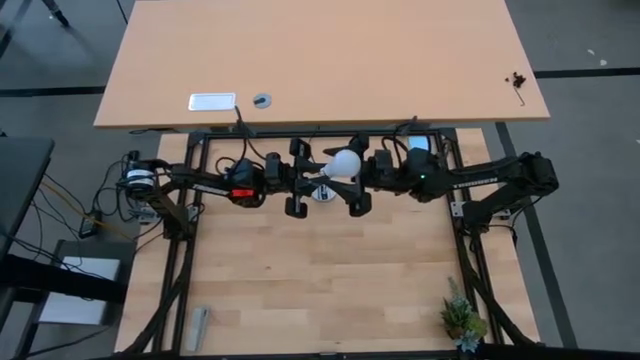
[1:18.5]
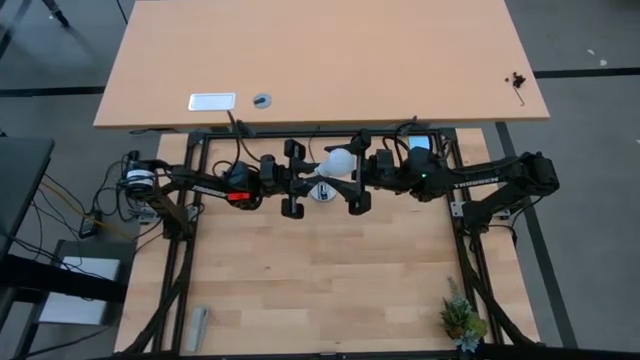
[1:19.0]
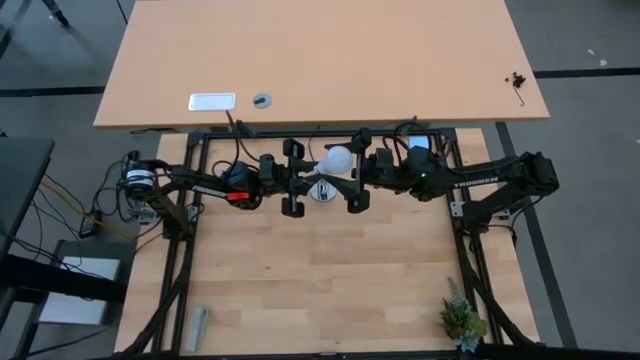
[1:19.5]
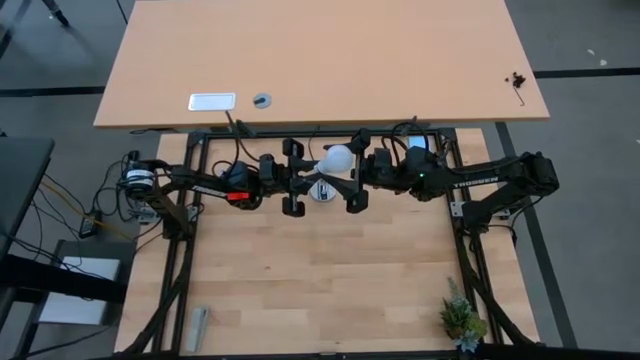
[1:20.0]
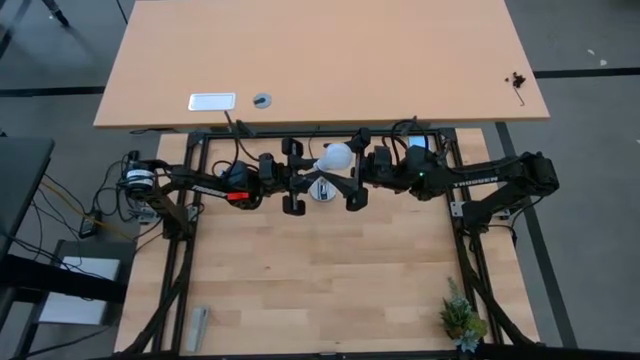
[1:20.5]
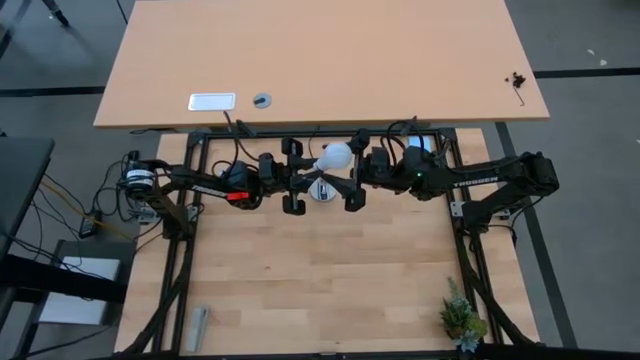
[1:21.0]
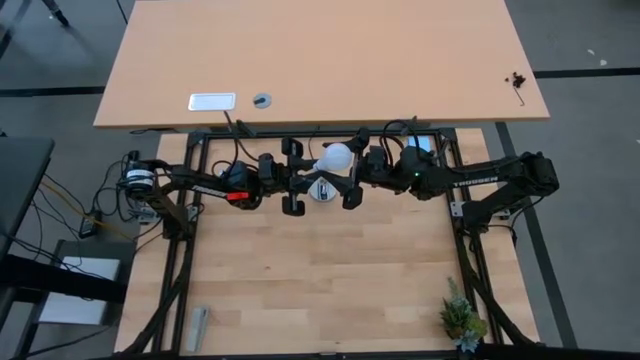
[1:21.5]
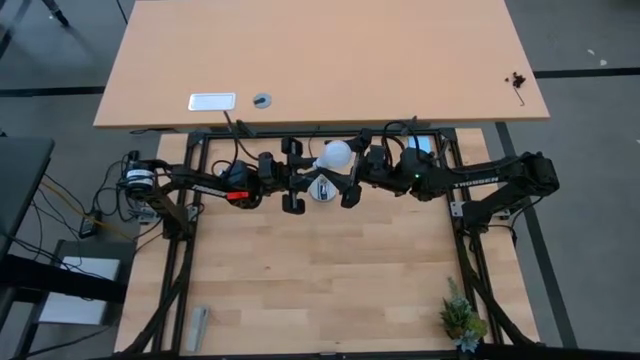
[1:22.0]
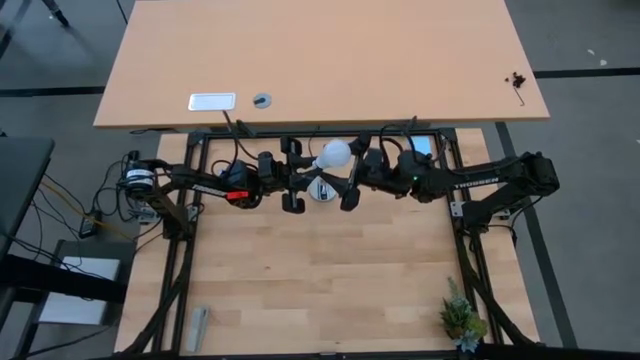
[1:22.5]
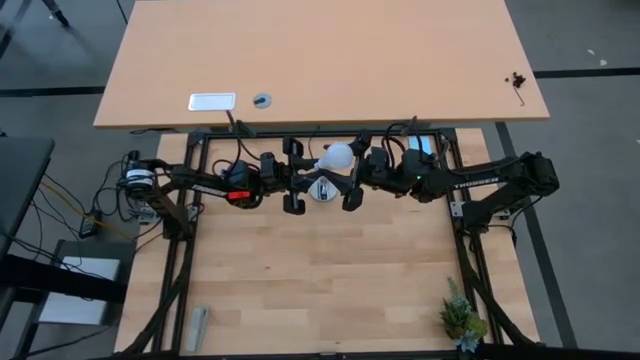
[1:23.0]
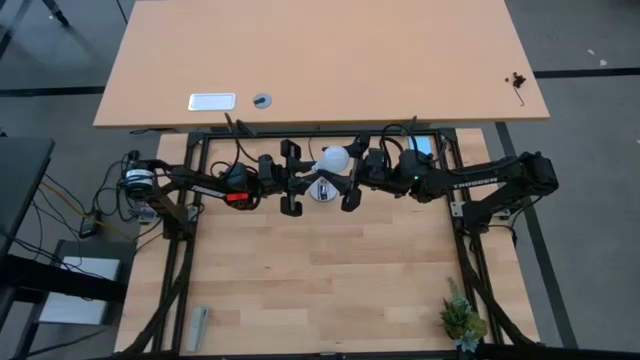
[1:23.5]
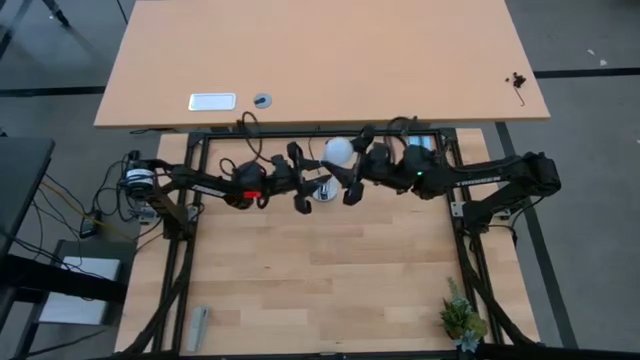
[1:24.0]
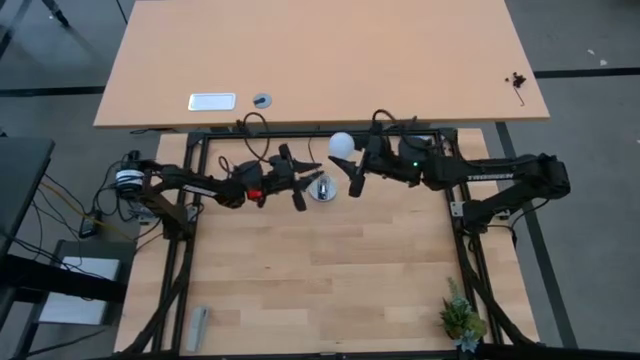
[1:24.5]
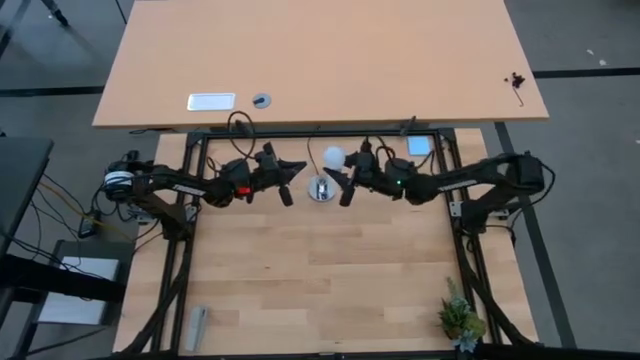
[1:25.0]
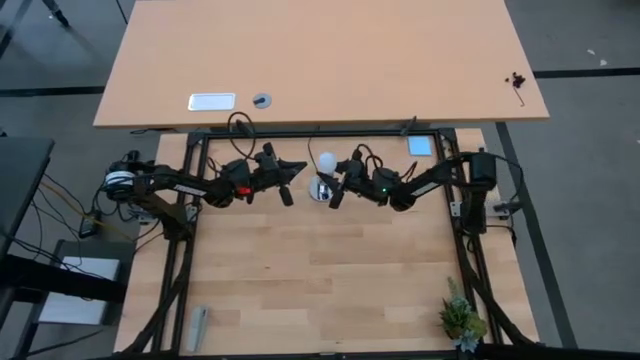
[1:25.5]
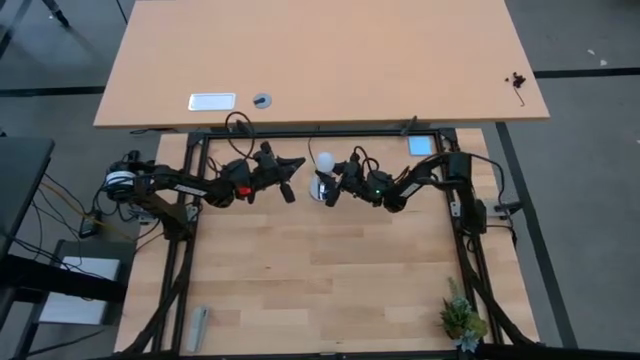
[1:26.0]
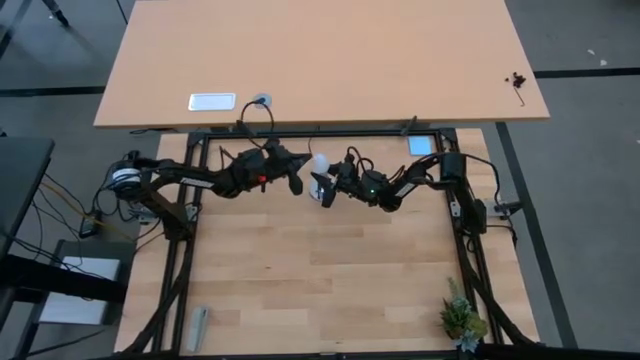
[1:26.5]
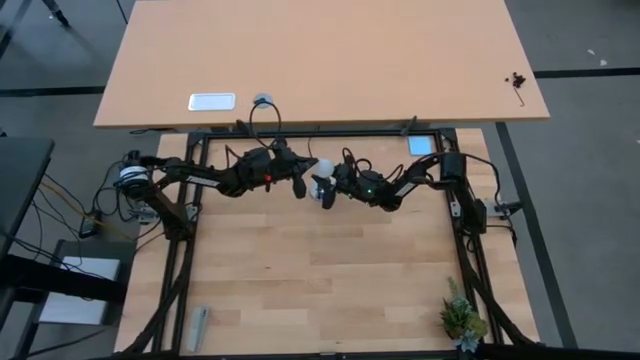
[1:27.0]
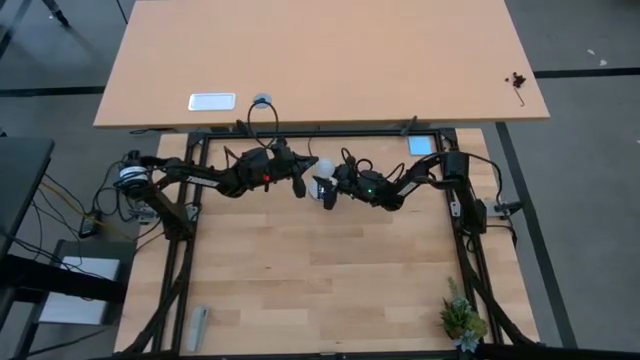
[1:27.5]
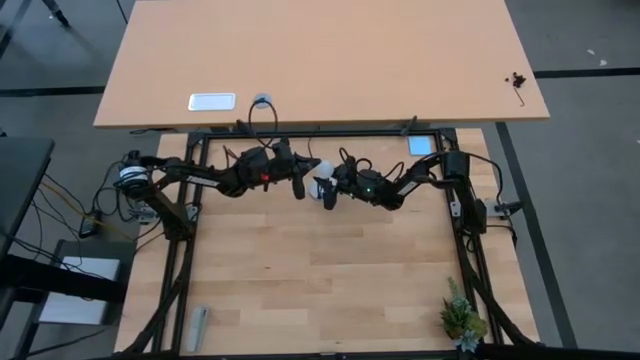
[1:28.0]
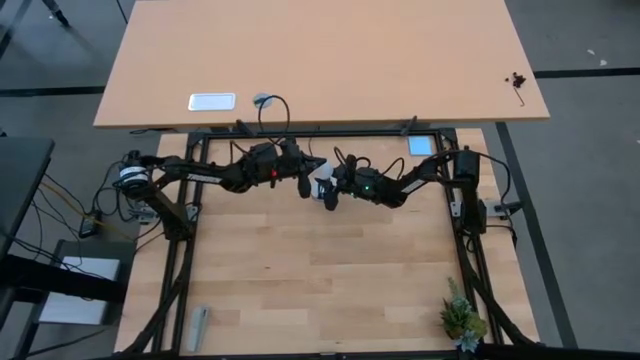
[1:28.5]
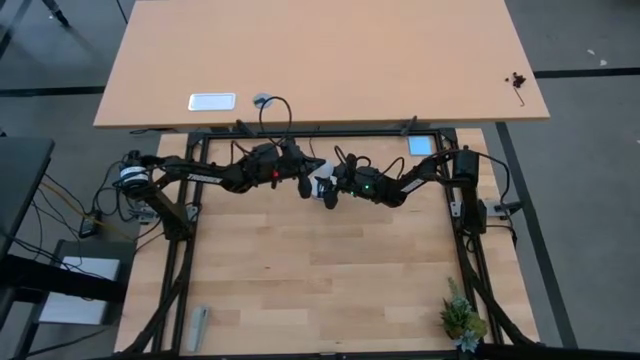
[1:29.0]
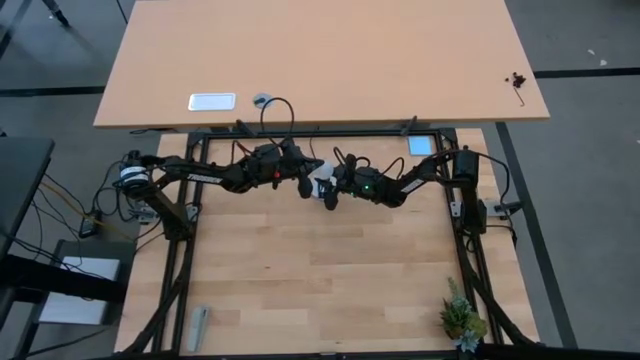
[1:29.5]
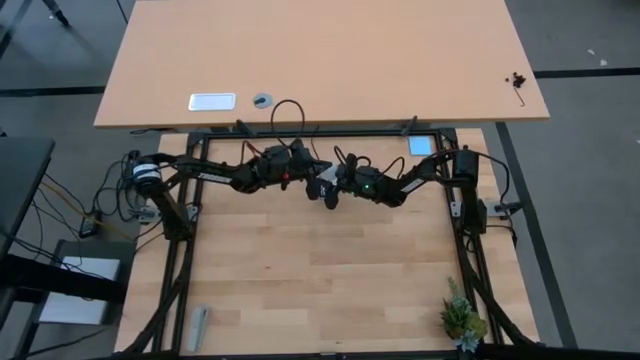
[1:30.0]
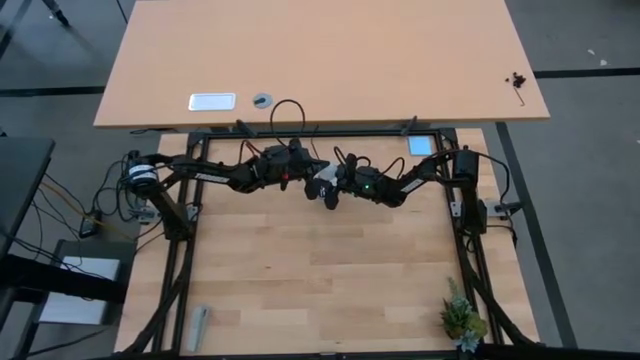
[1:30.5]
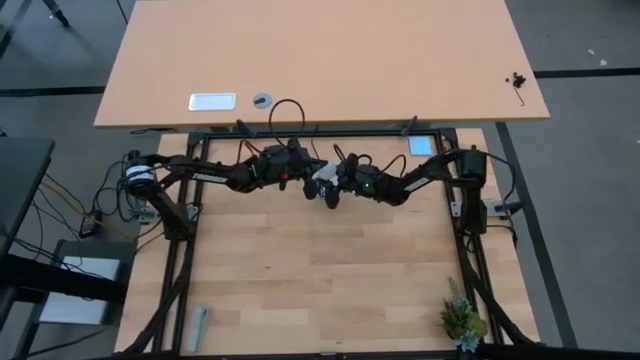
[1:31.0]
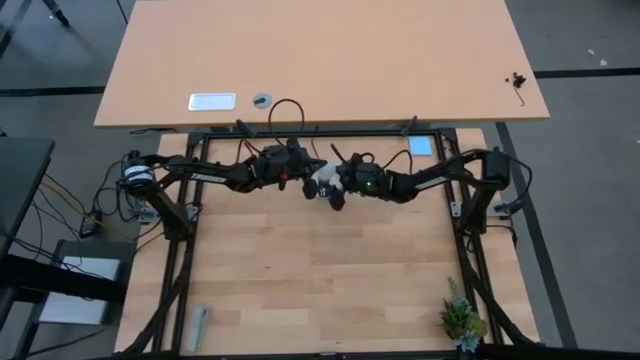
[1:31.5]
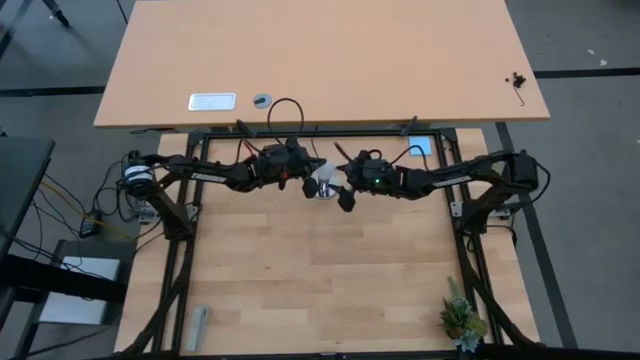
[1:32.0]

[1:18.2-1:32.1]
Task: Screw lightbulb
Insert the lightbulb into the lamp

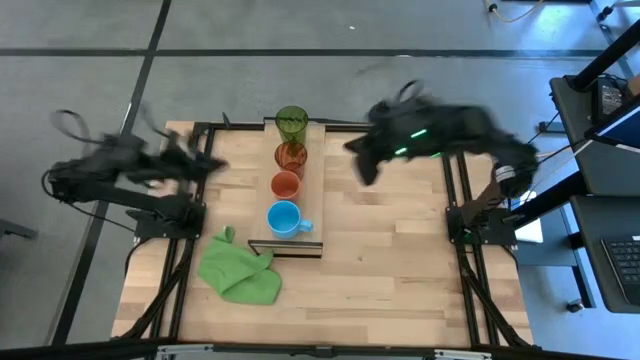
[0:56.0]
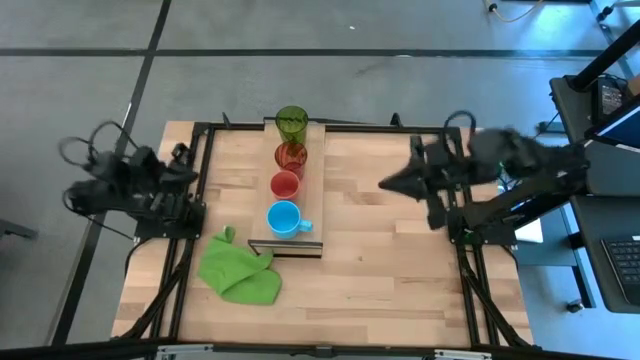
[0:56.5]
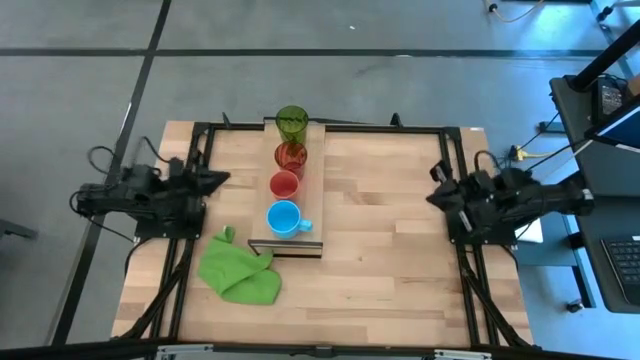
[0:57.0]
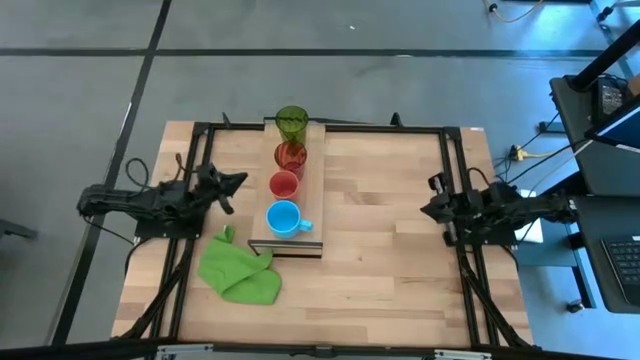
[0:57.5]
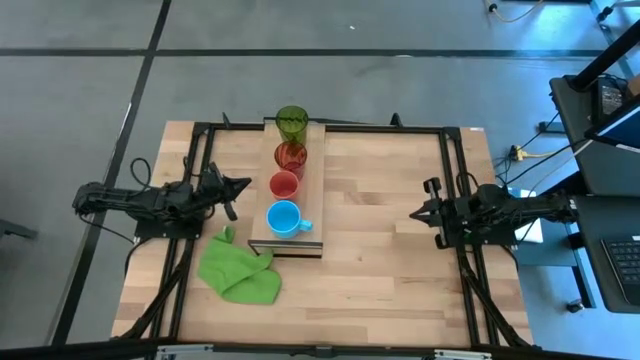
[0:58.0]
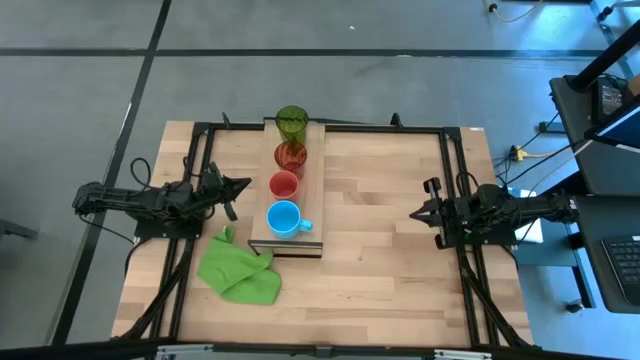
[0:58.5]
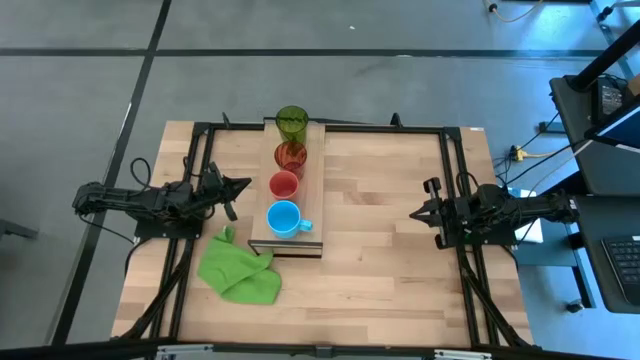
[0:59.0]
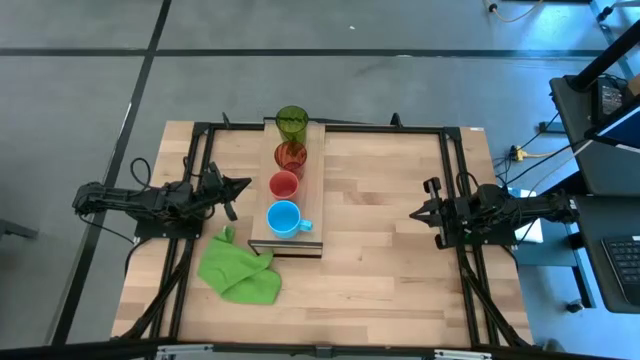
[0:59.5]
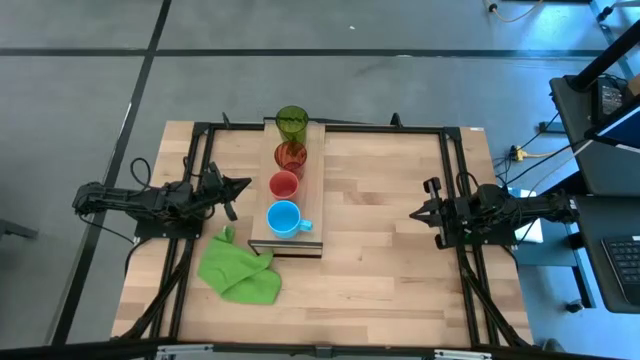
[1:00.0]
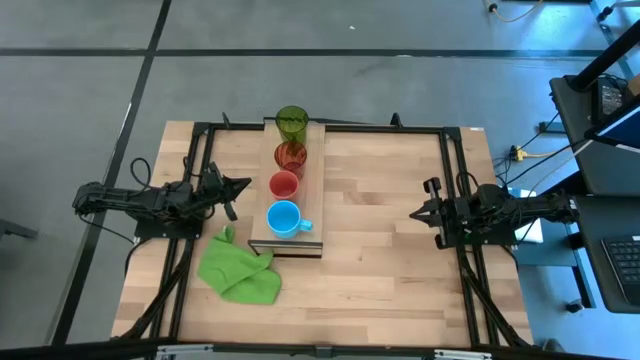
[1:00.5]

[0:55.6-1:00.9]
Task: Stack small to large cups/mugs on shelf
Return to Home Position
